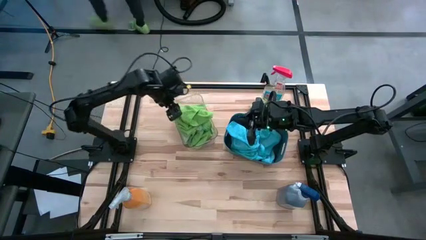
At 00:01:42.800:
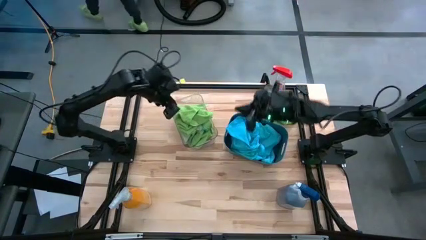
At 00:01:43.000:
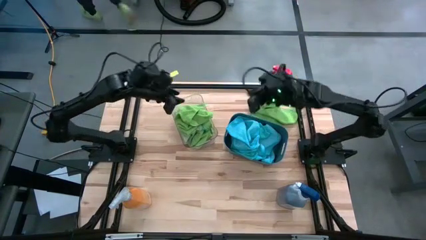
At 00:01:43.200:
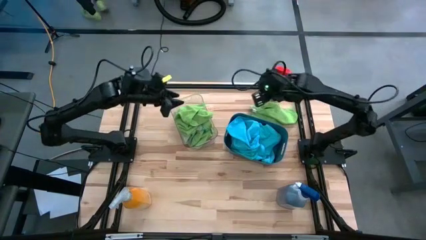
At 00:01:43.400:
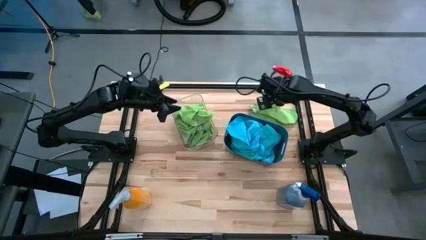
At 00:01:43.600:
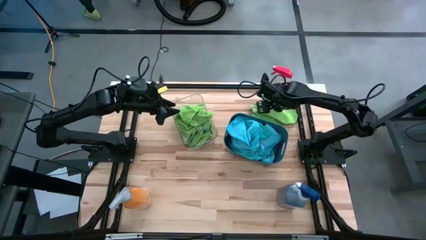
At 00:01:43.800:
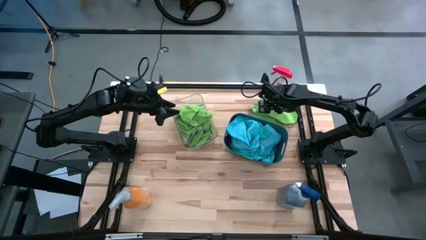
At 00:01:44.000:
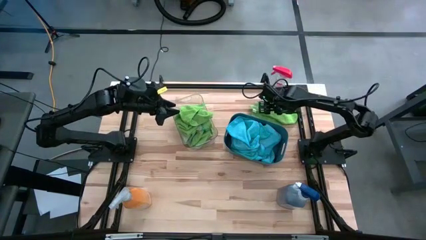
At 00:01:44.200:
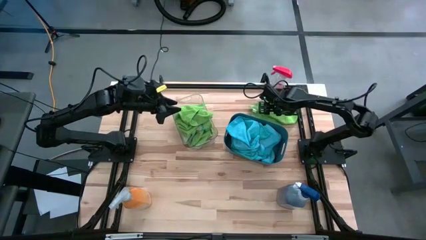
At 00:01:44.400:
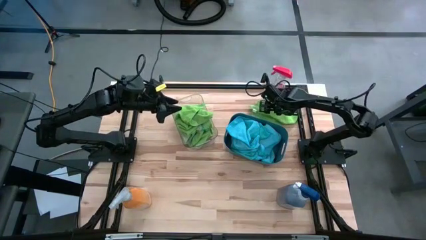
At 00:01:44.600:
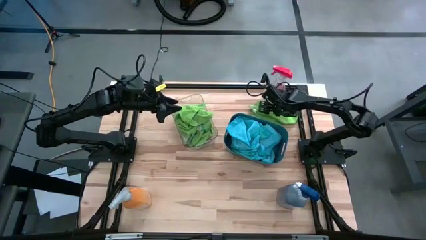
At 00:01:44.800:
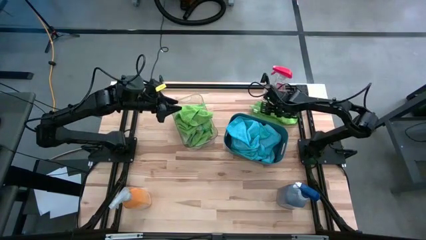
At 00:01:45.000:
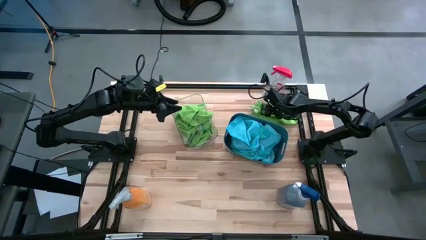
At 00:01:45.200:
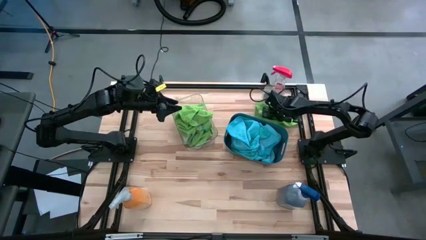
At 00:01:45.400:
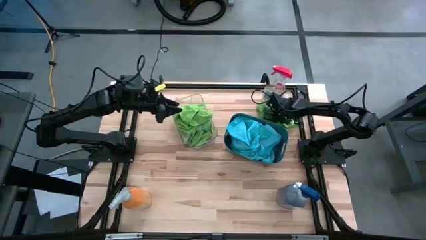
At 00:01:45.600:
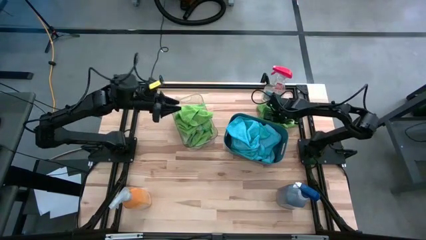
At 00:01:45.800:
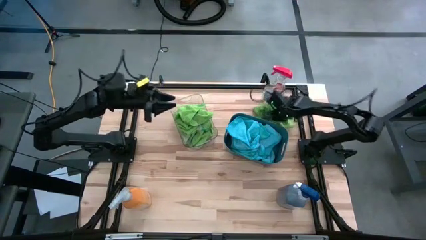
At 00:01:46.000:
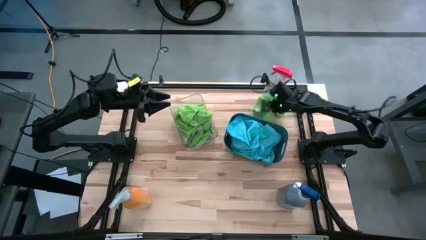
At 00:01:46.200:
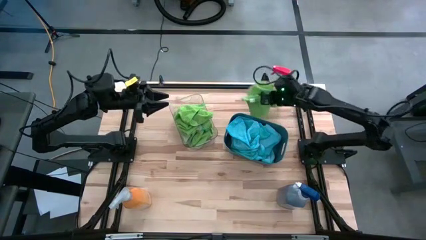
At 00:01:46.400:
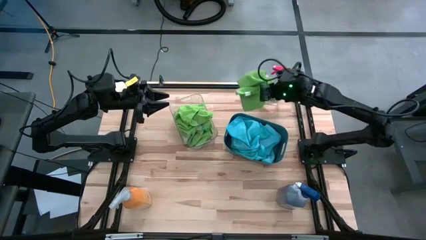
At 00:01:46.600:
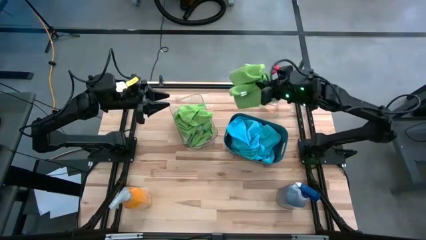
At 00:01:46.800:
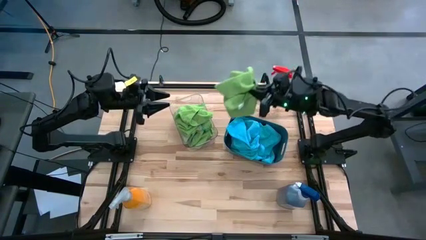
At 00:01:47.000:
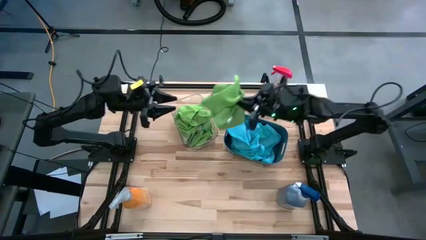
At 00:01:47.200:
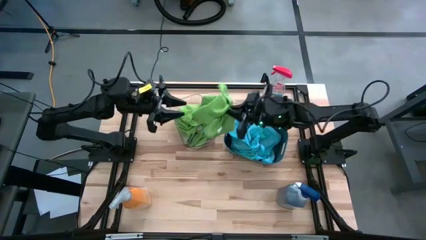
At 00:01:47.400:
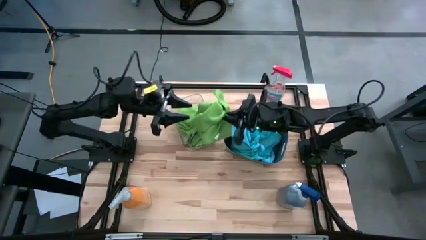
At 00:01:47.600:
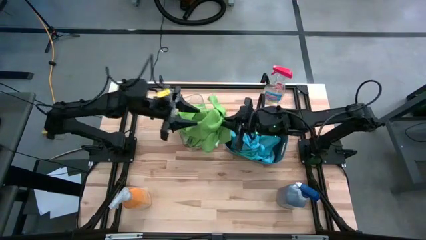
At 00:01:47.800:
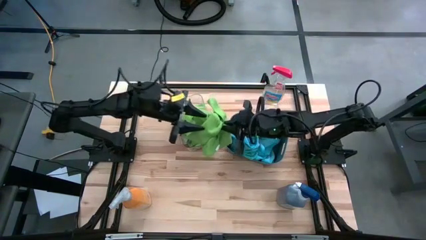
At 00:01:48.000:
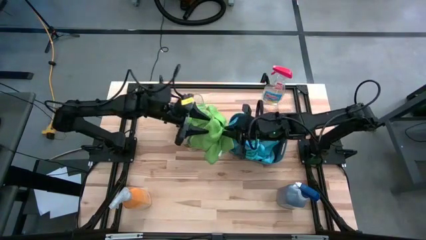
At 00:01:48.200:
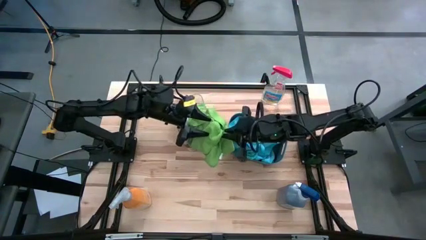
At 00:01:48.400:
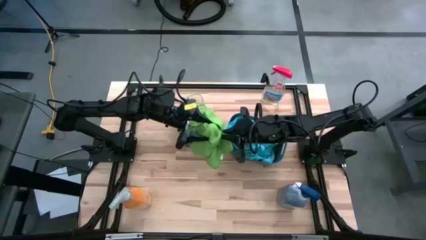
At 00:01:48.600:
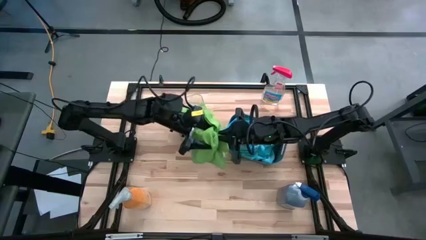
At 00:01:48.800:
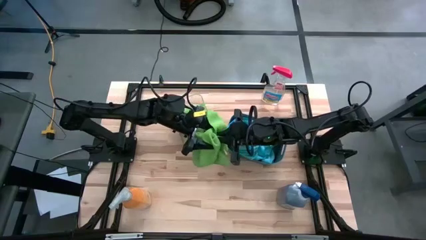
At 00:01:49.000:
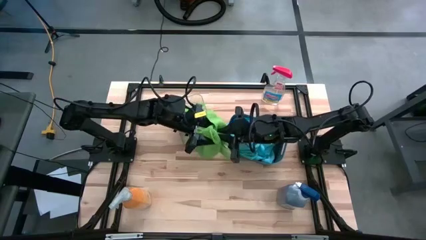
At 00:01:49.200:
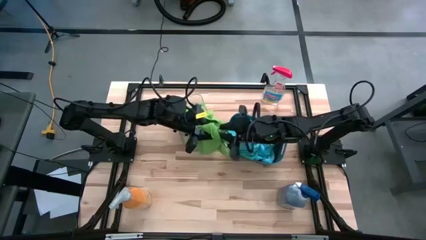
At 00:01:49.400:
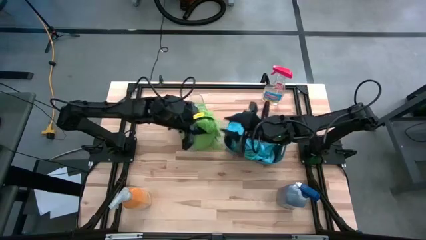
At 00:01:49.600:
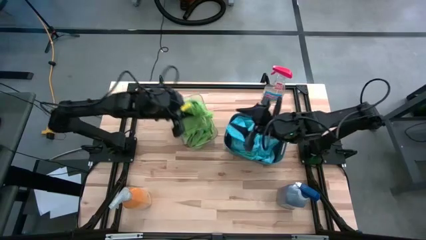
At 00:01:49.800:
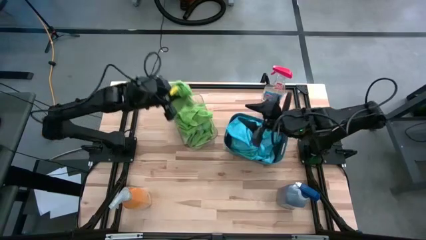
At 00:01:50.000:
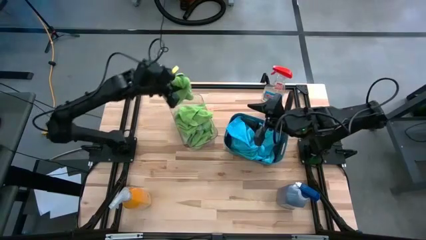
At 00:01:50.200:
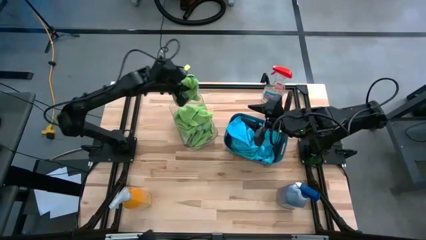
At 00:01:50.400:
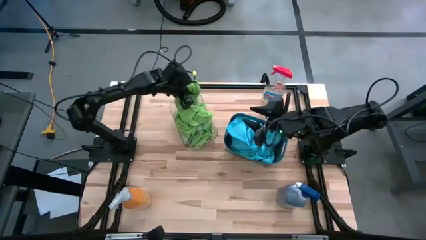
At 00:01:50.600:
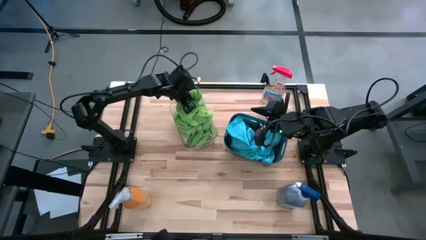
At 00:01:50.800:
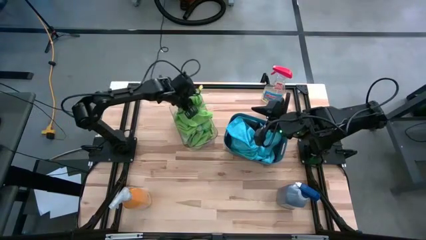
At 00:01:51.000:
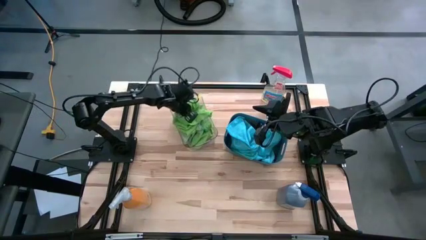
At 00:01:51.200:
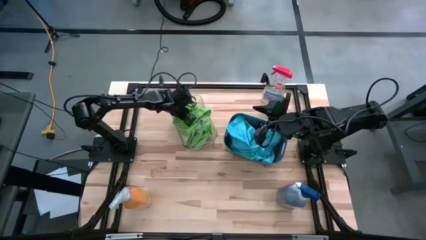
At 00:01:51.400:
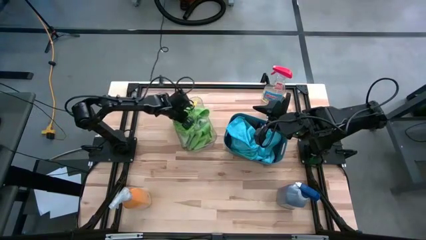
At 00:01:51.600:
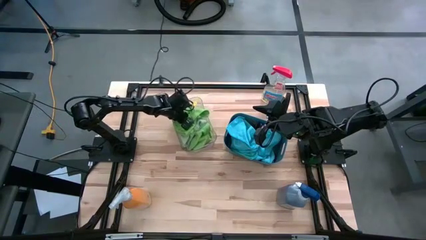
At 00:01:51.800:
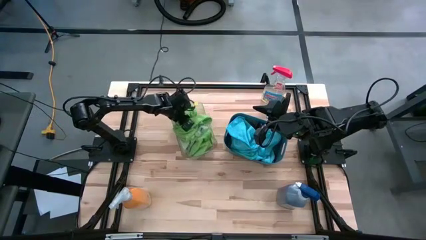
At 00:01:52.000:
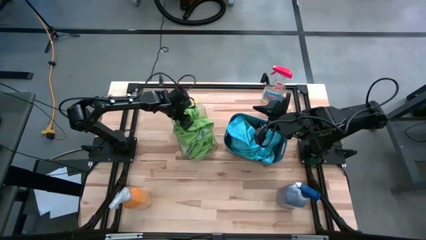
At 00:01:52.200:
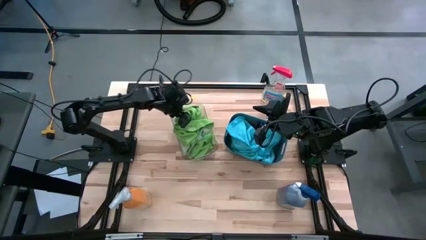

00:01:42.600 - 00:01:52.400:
Task: Sort microfiber towel by color & place in baskets
Put the green towel into the transparent bin
